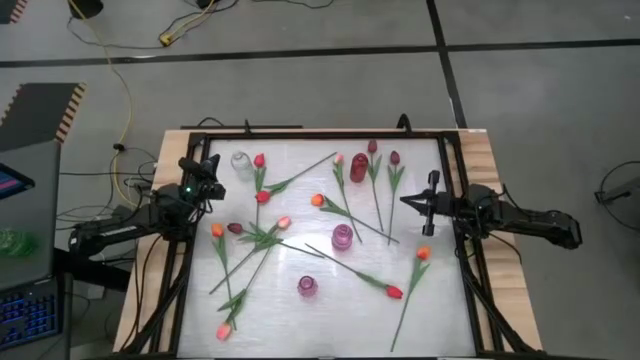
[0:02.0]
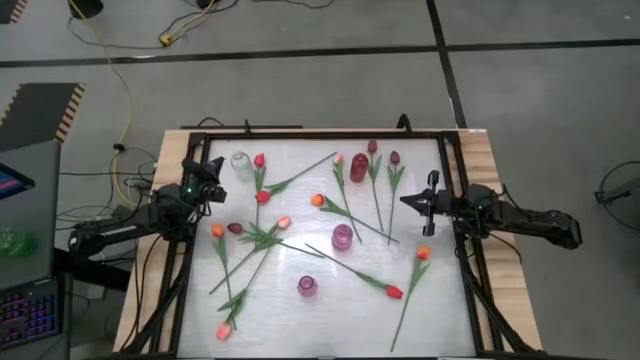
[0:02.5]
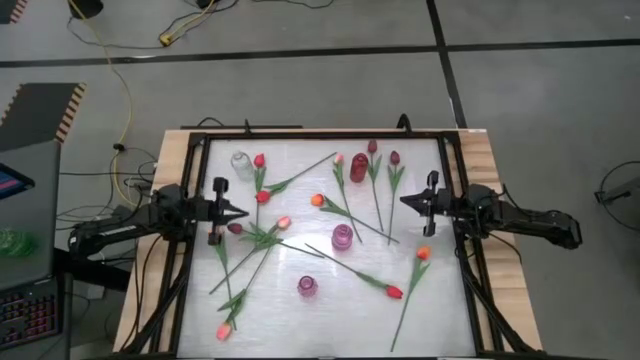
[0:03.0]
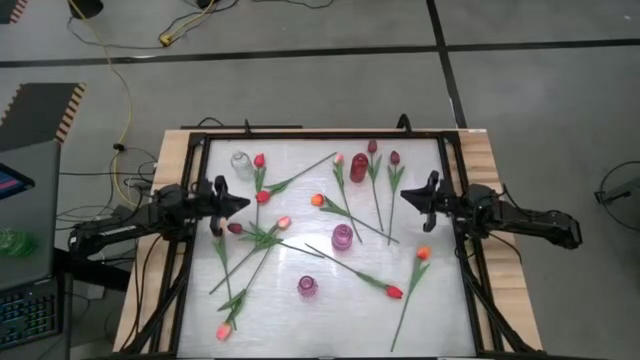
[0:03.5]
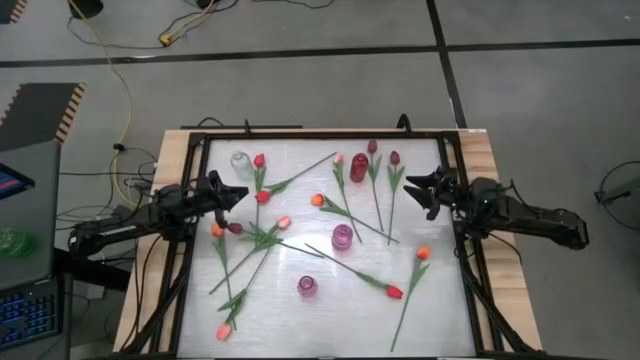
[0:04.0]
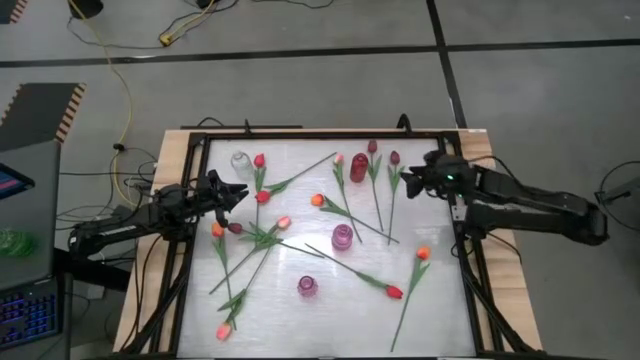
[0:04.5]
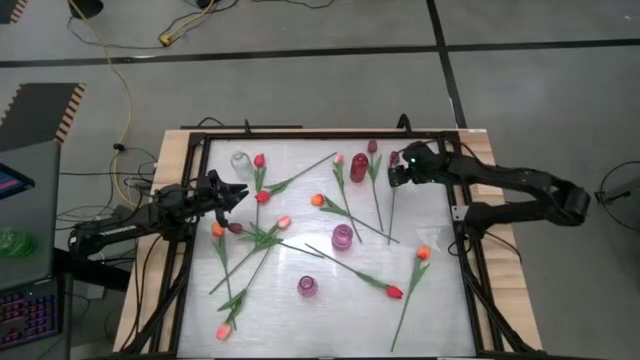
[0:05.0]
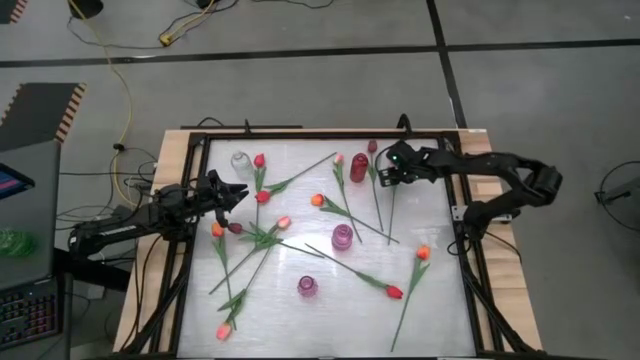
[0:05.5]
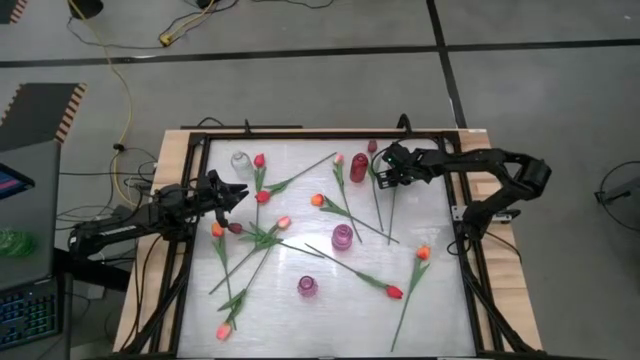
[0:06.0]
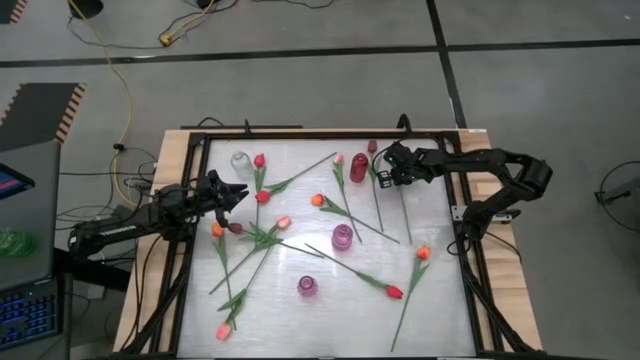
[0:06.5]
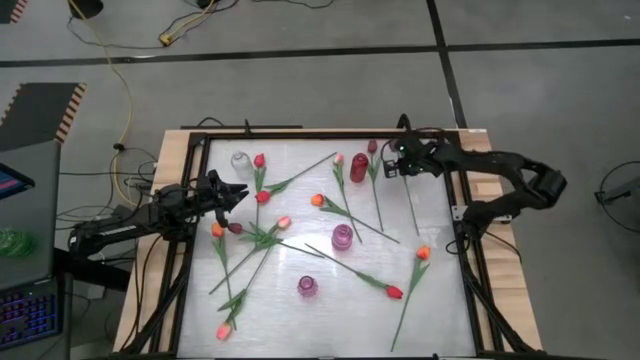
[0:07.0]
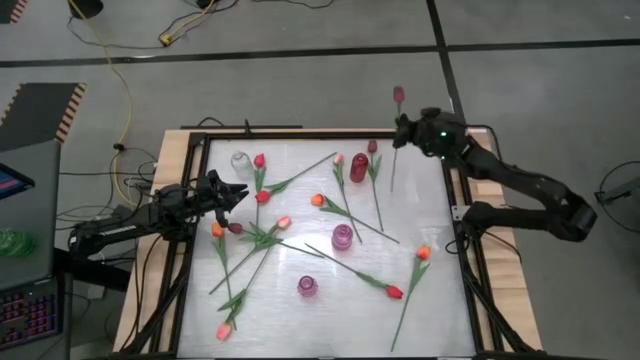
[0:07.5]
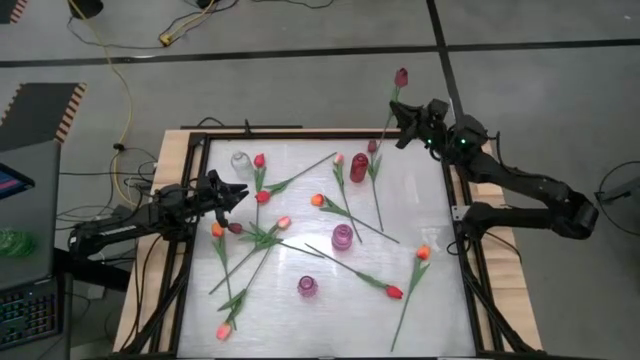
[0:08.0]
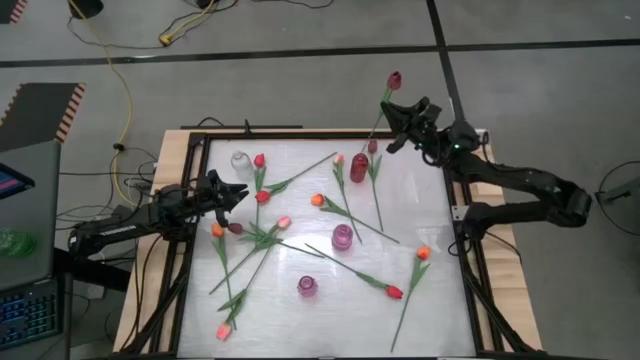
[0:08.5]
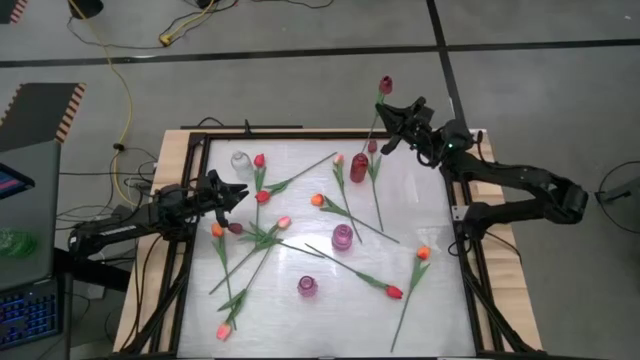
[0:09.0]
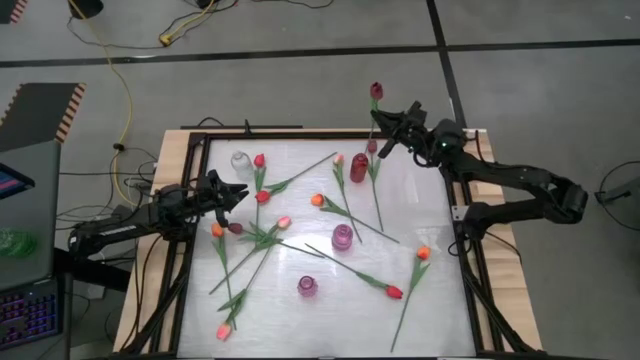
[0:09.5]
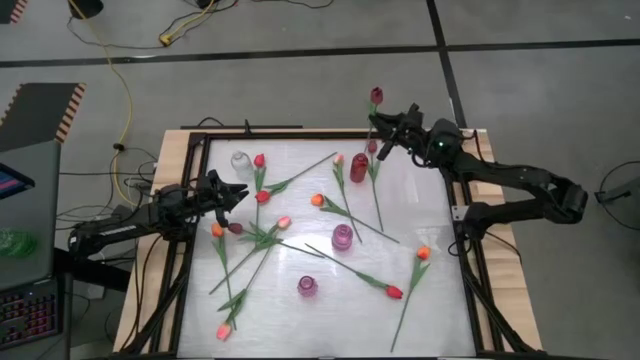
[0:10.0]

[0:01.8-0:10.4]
Task: Sort flowers into vase by color
Put the top right dark red flower into the red vase

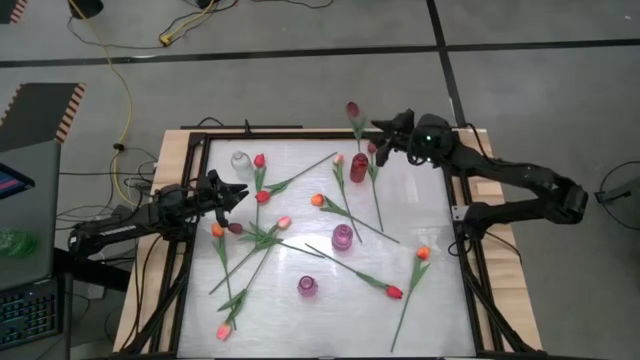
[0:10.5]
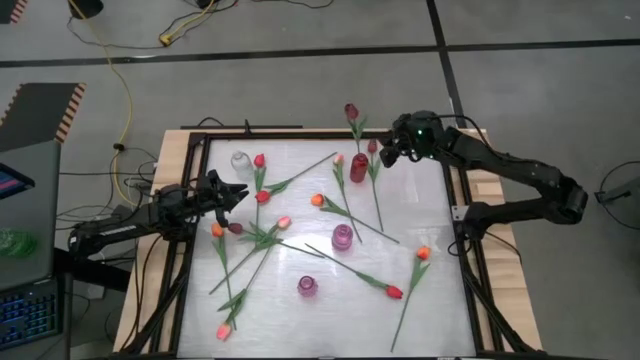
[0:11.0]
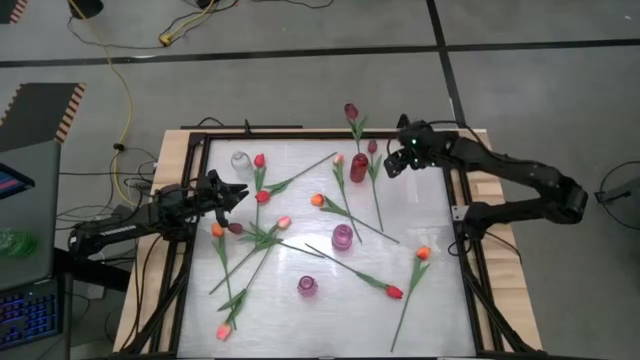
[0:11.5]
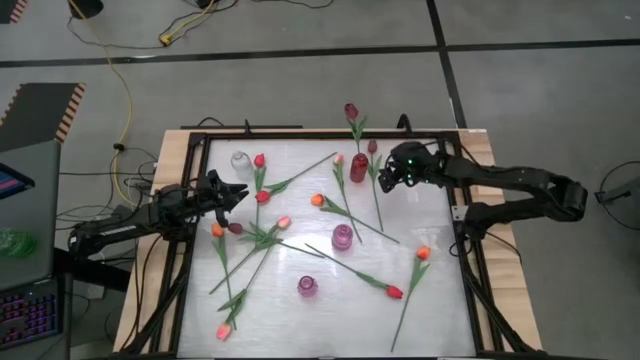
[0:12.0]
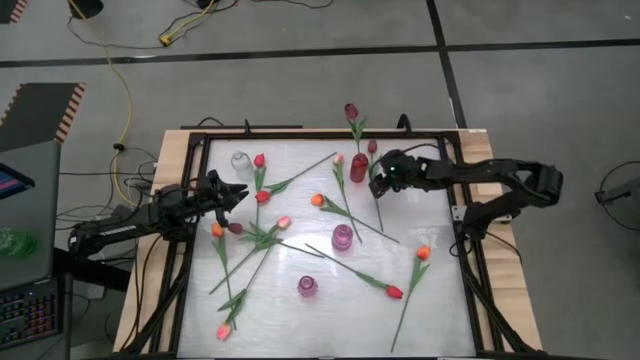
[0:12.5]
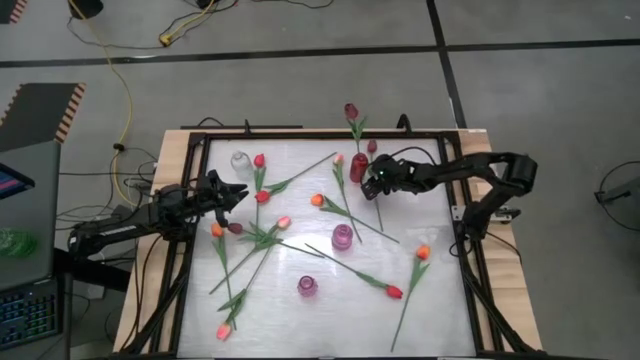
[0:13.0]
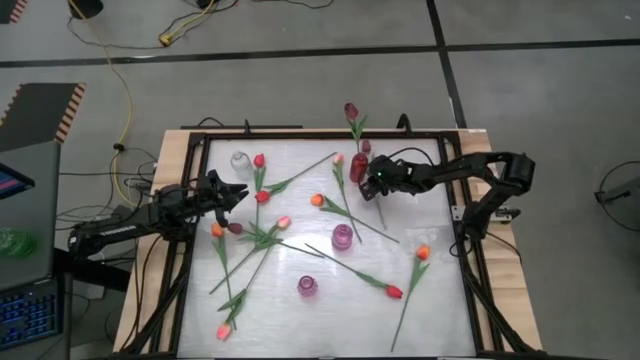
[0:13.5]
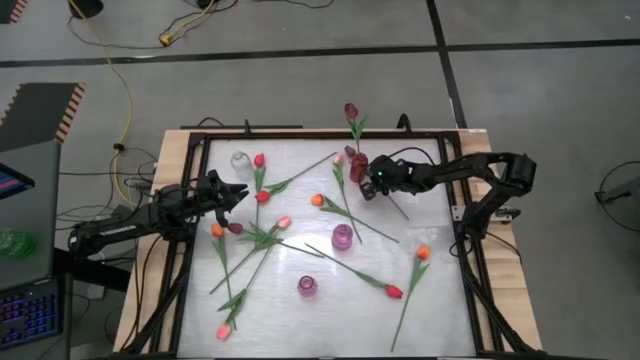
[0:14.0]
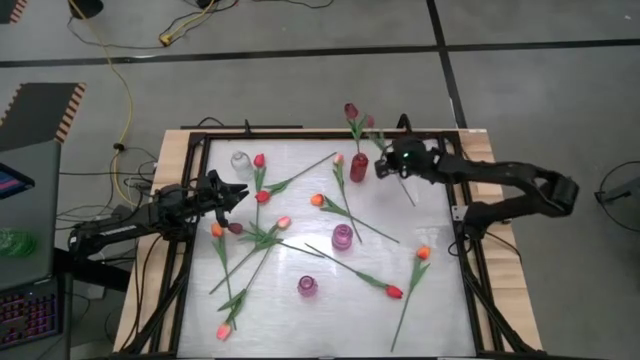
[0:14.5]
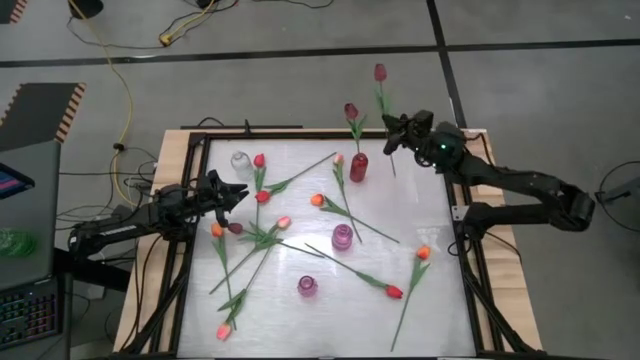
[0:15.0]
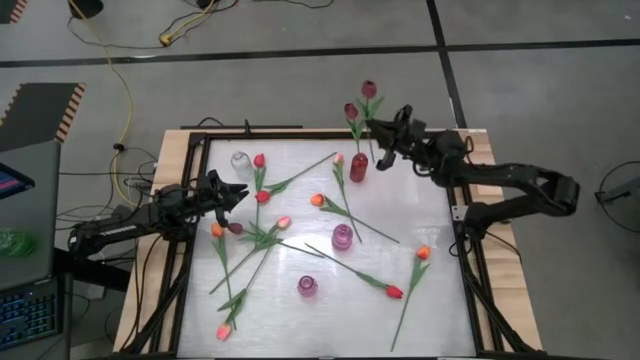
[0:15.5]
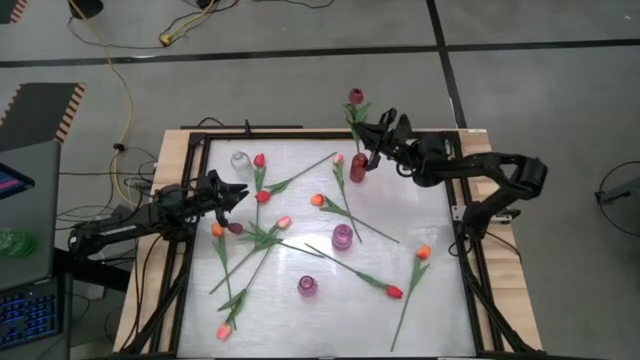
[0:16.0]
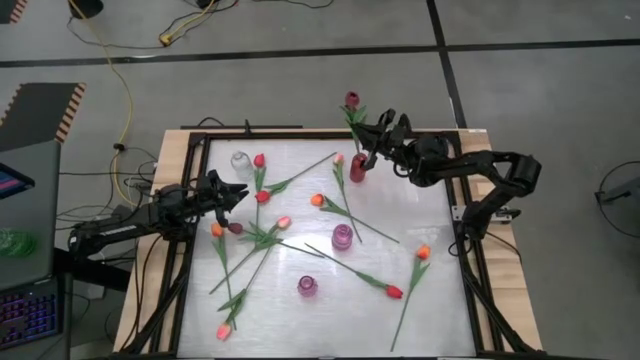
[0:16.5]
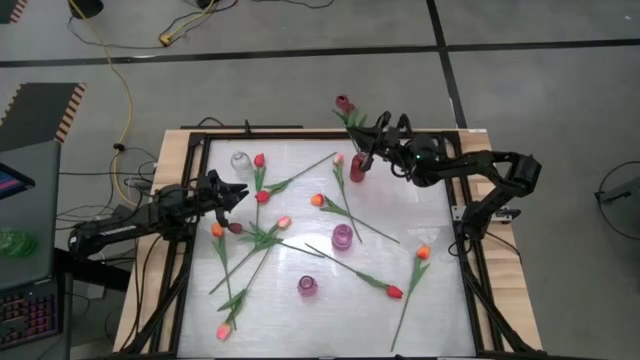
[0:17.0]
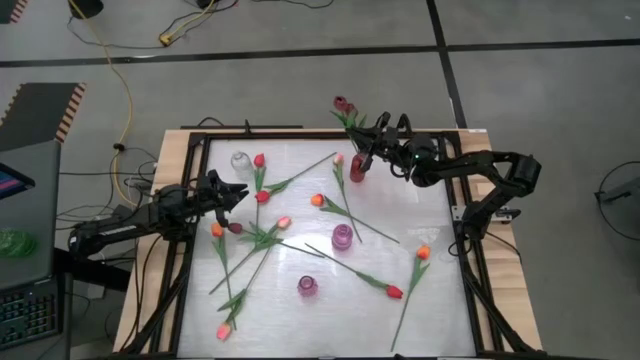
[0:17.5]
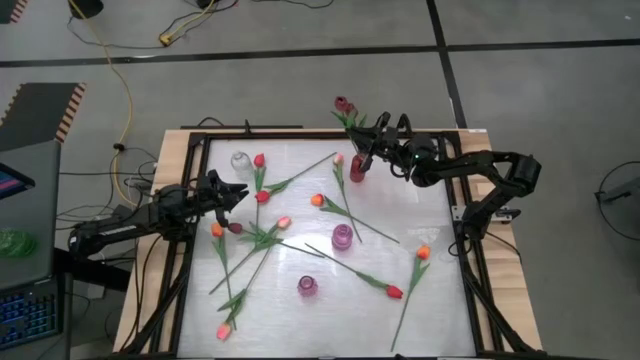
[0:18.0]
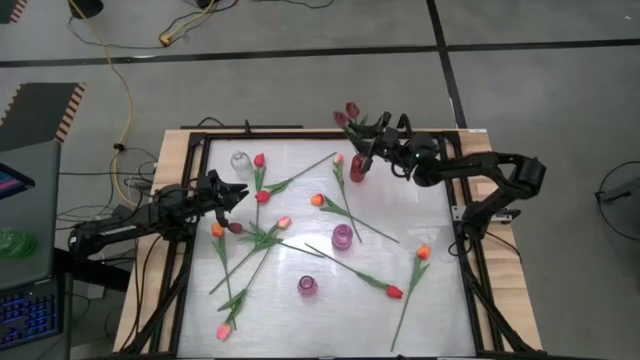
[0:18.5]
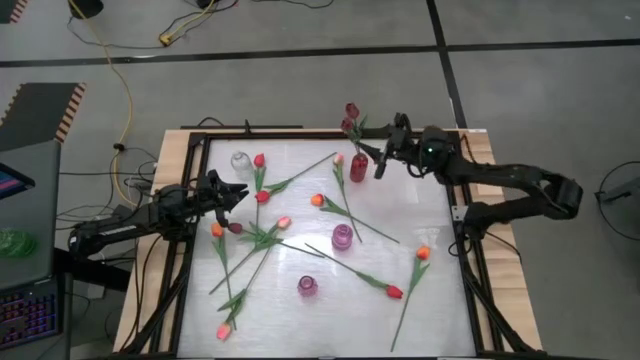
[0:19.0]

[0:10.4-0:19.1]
Put the top left dark red flower into the red vase

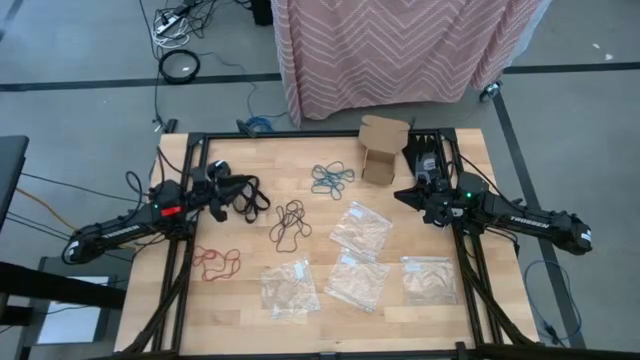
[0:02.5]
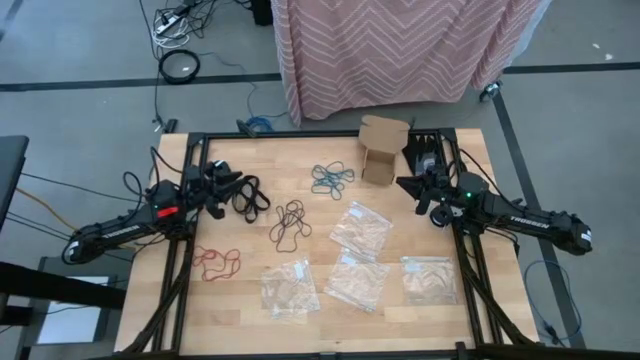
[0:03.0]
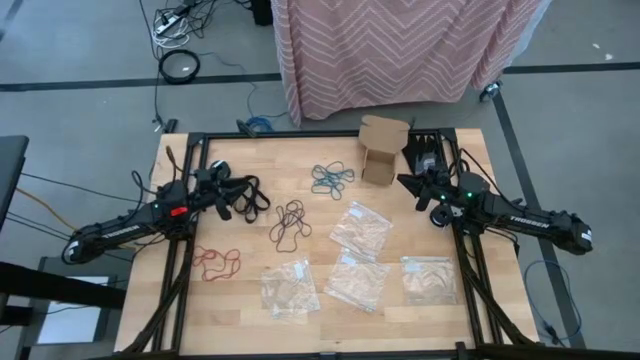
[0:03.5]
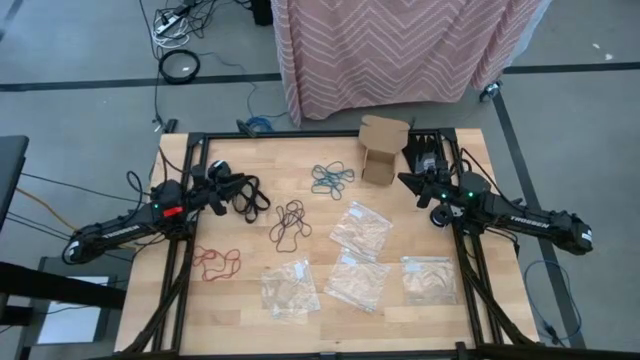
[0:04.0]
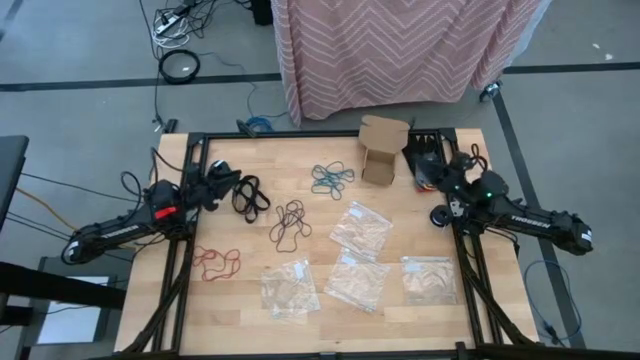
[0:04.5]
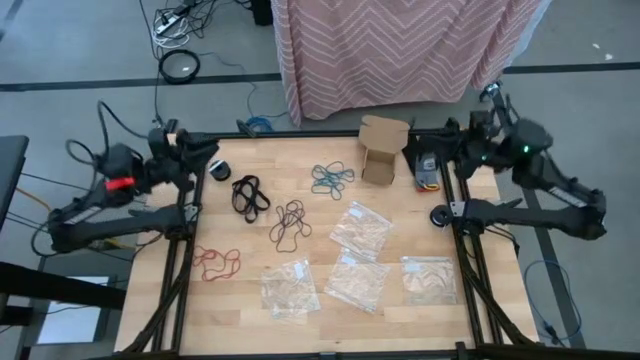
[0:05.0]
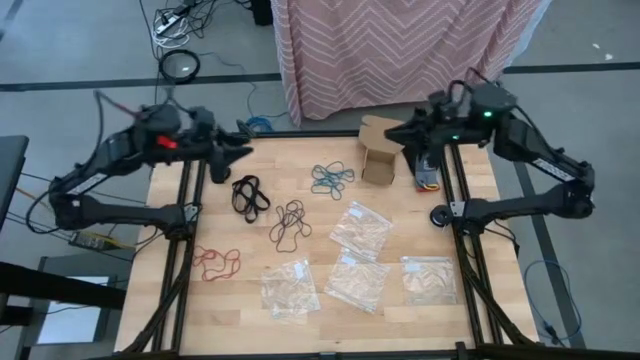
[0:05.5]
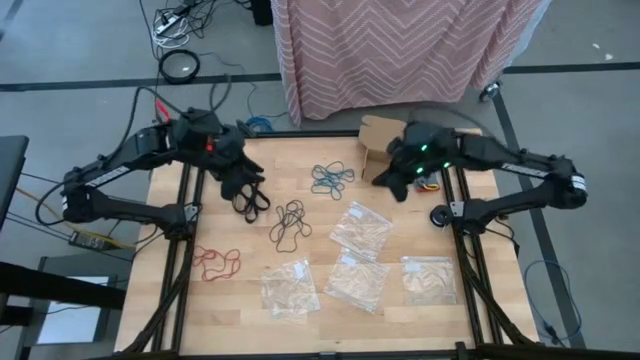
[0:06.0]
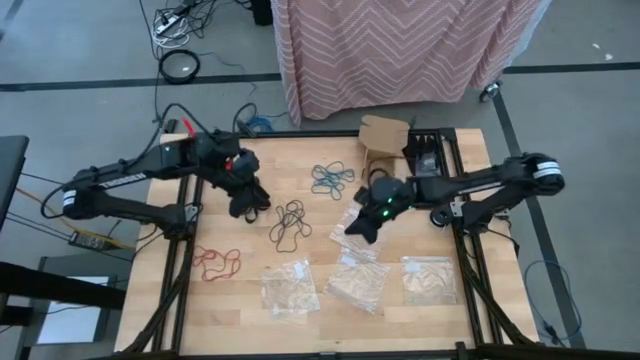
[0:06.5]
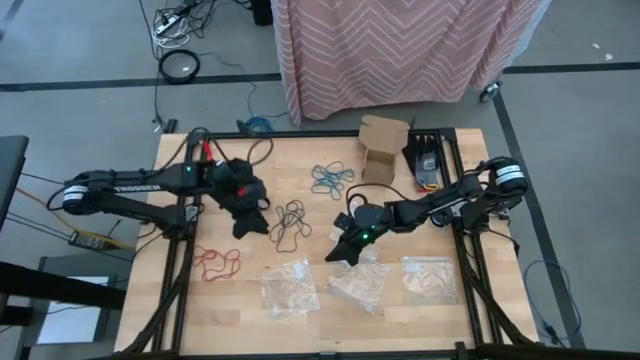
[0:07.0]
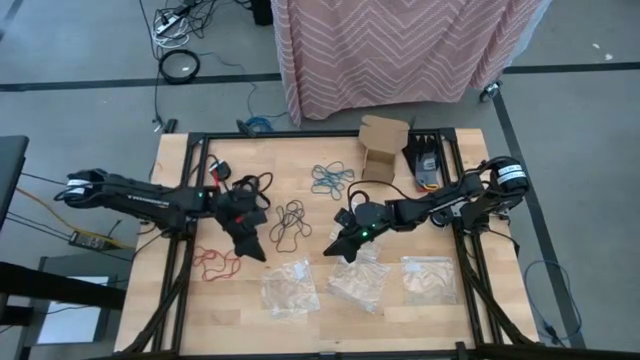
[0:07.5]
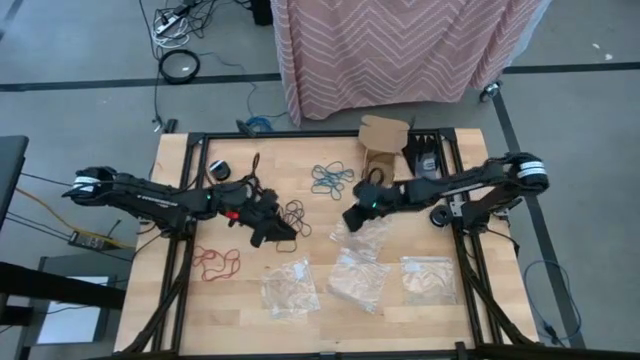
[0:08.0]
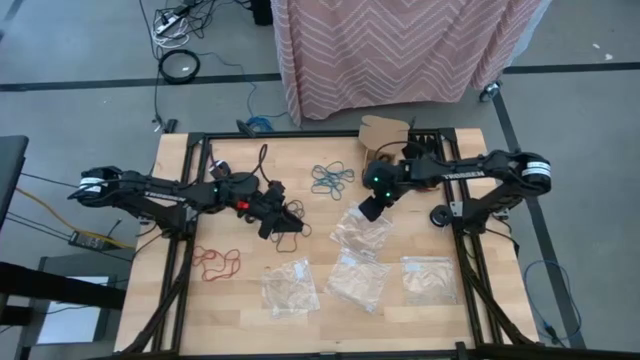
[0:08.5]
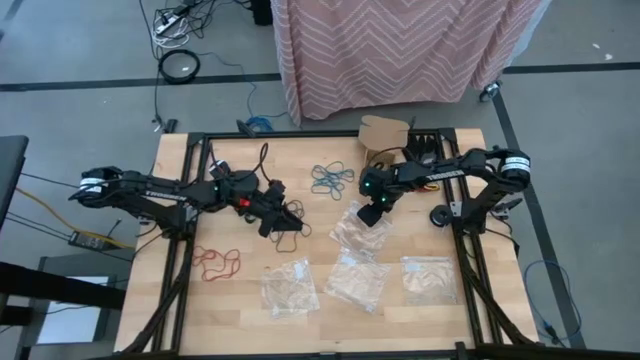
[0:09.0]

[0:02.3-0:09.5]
Task: Sort rubber bands
Open the top transparent zip bag
